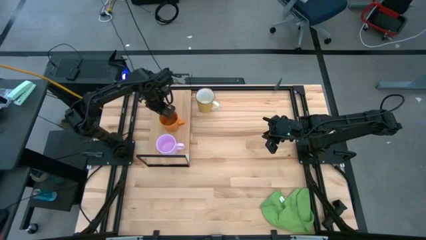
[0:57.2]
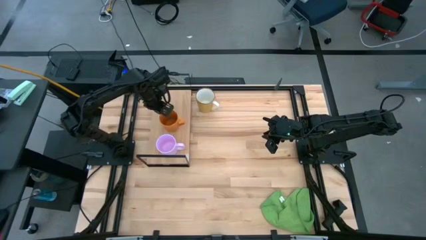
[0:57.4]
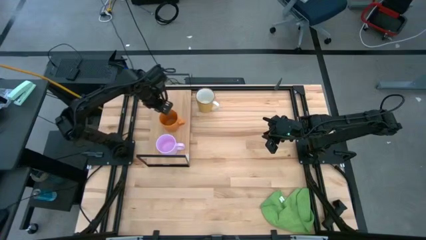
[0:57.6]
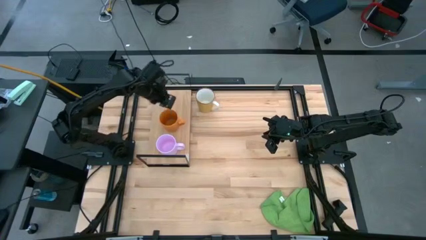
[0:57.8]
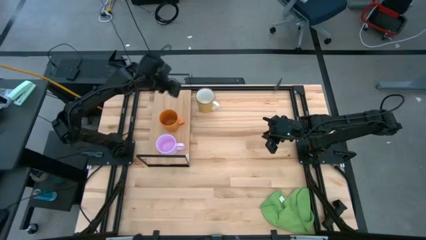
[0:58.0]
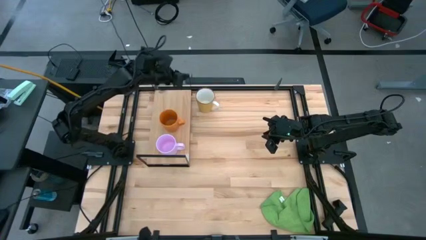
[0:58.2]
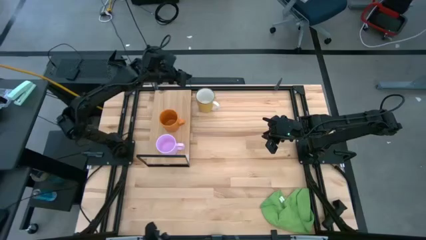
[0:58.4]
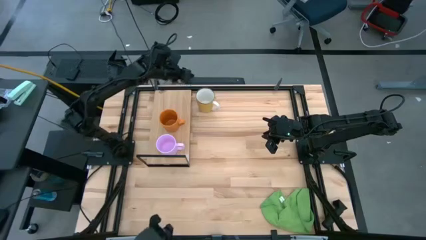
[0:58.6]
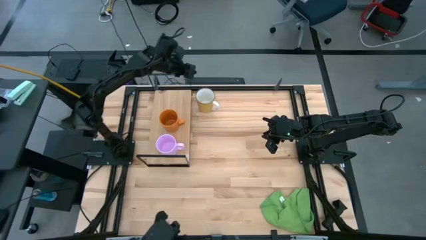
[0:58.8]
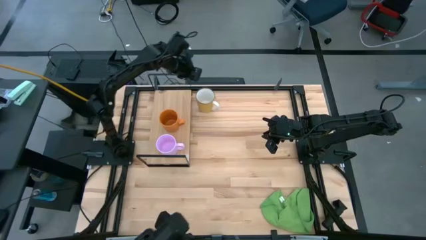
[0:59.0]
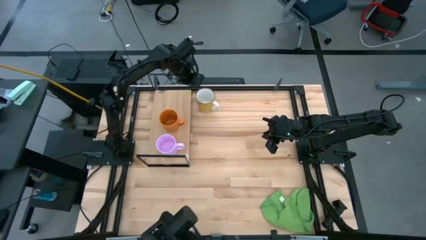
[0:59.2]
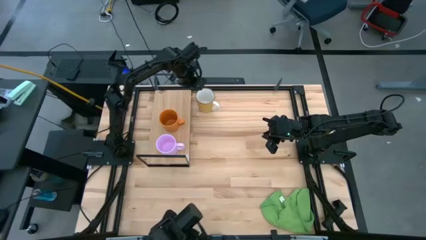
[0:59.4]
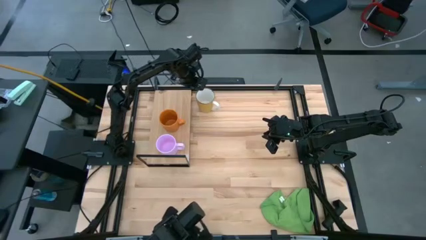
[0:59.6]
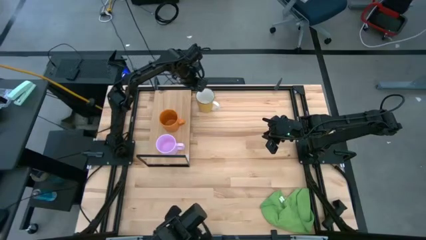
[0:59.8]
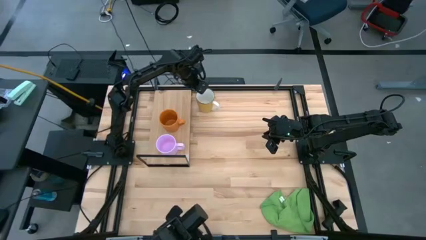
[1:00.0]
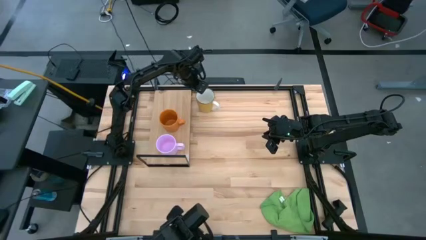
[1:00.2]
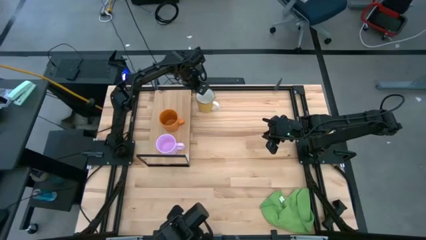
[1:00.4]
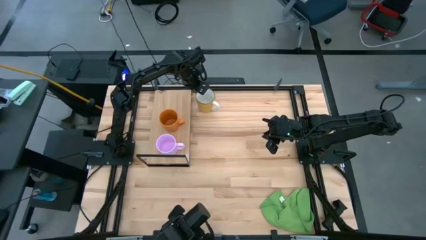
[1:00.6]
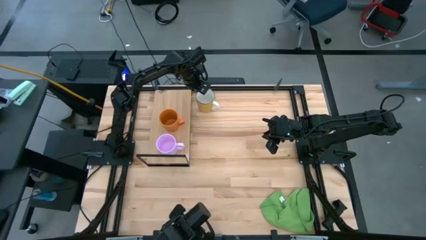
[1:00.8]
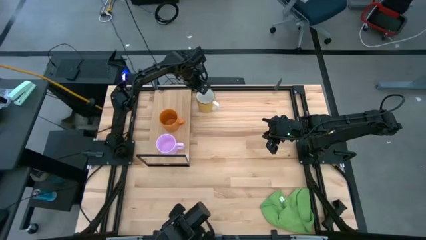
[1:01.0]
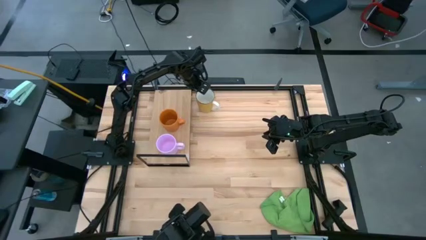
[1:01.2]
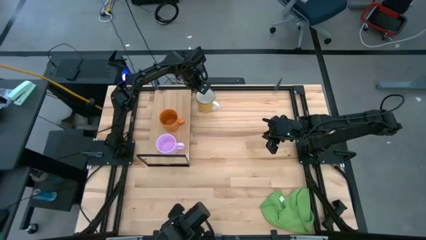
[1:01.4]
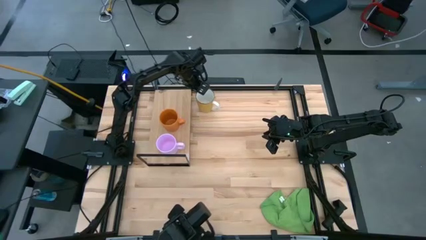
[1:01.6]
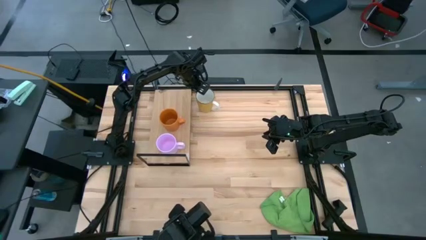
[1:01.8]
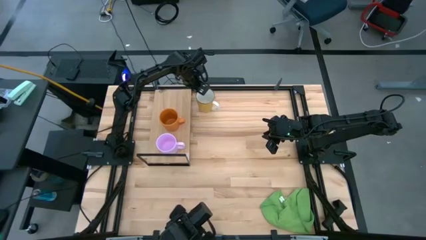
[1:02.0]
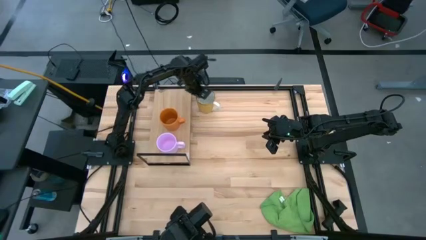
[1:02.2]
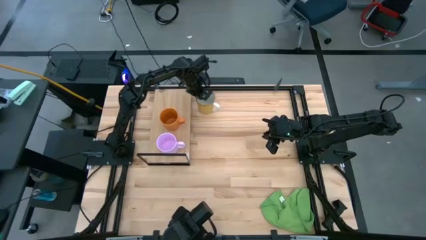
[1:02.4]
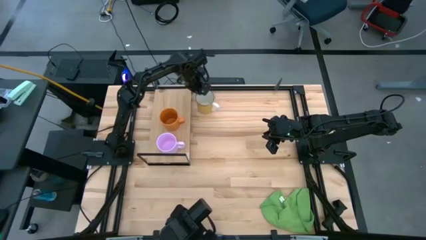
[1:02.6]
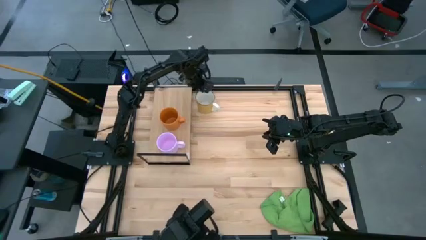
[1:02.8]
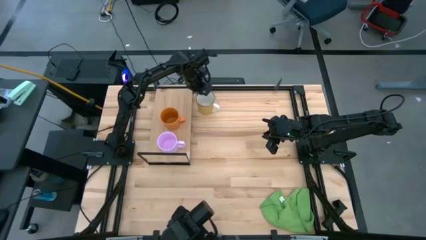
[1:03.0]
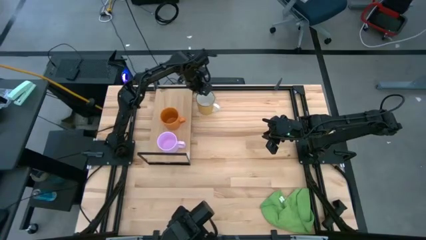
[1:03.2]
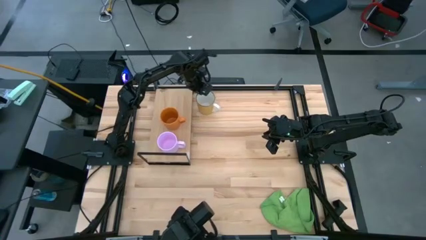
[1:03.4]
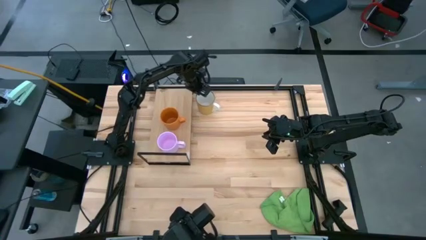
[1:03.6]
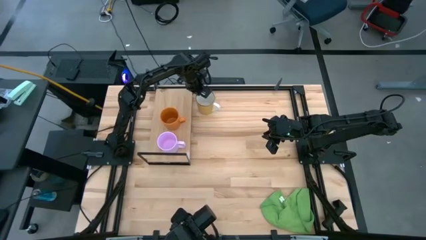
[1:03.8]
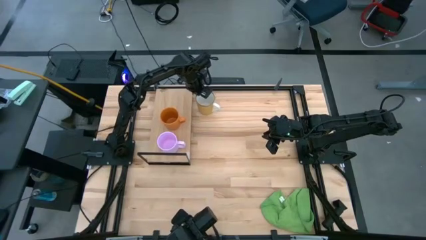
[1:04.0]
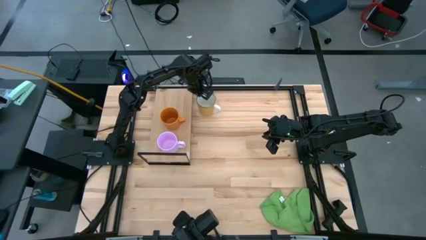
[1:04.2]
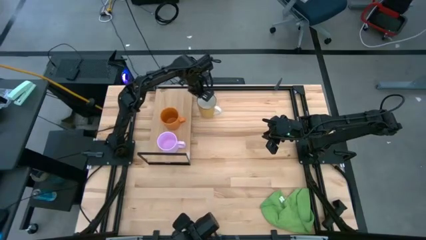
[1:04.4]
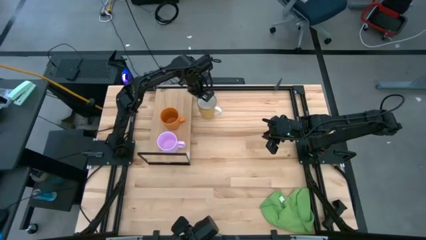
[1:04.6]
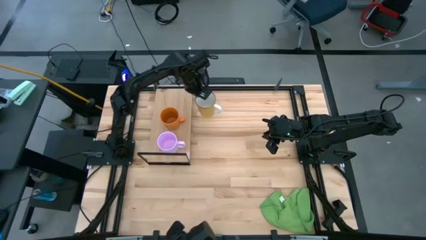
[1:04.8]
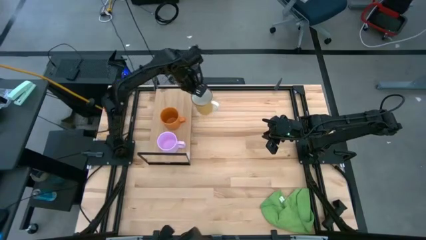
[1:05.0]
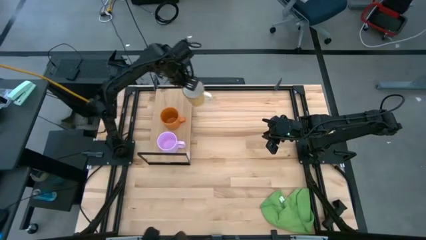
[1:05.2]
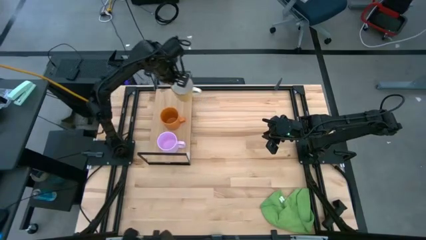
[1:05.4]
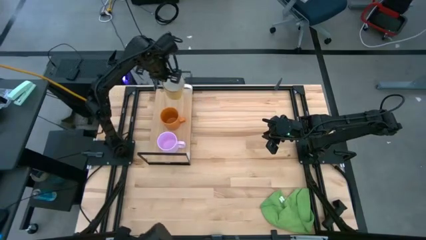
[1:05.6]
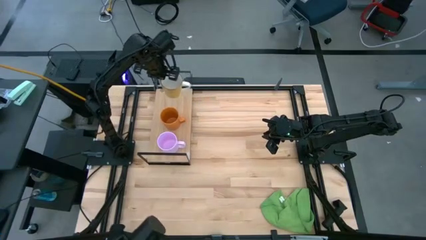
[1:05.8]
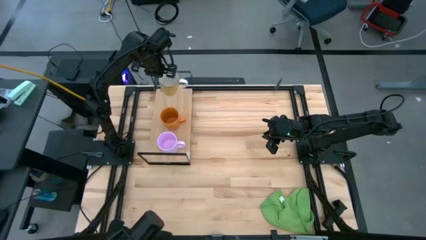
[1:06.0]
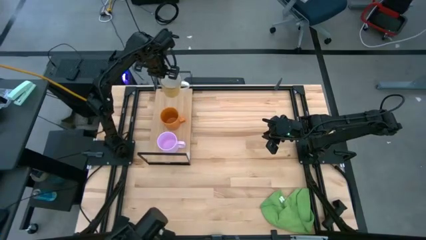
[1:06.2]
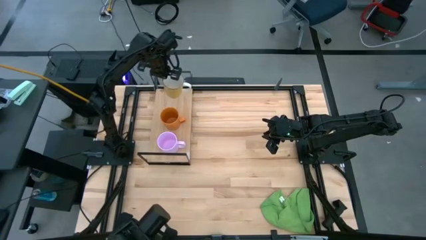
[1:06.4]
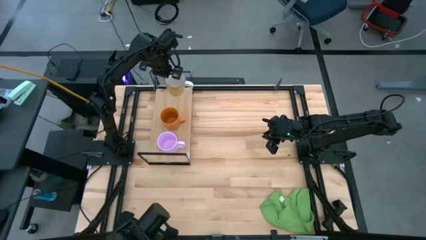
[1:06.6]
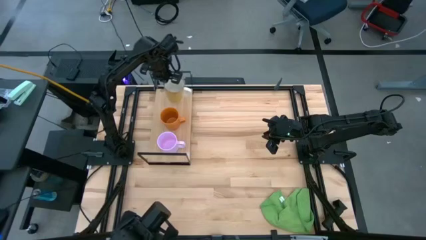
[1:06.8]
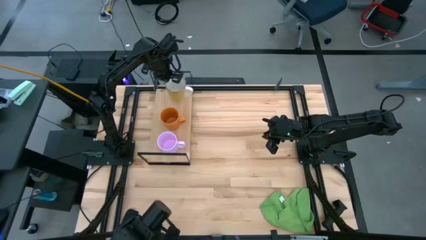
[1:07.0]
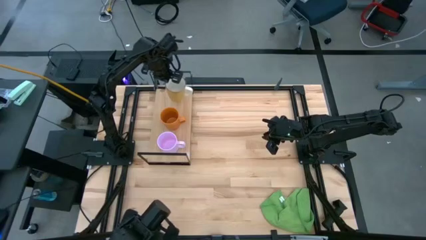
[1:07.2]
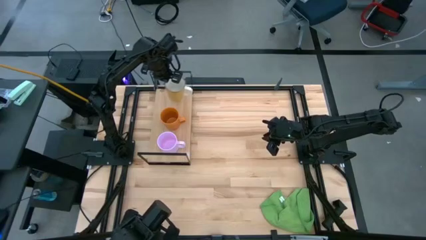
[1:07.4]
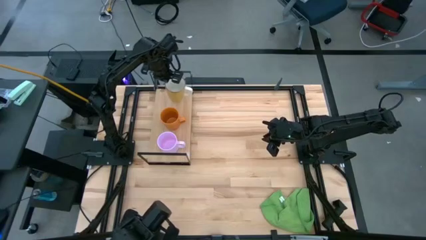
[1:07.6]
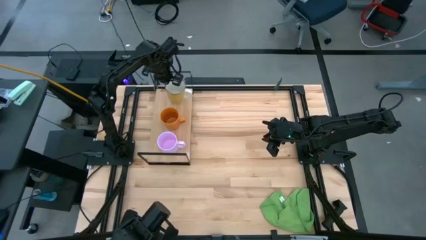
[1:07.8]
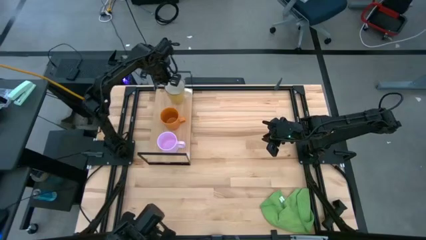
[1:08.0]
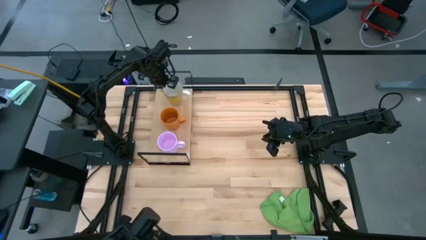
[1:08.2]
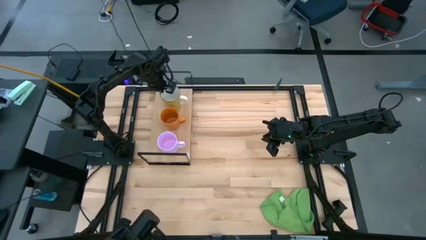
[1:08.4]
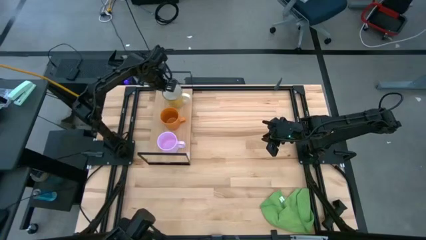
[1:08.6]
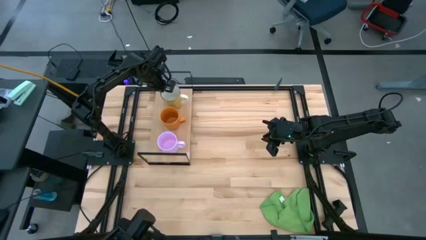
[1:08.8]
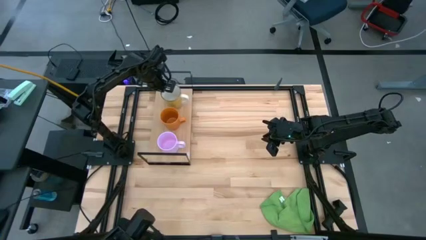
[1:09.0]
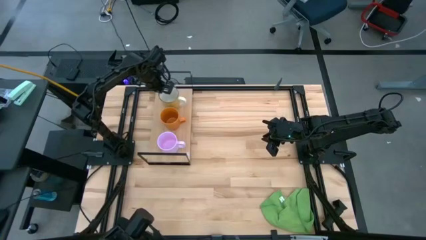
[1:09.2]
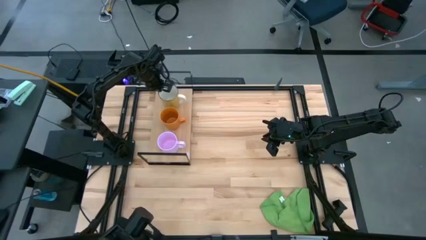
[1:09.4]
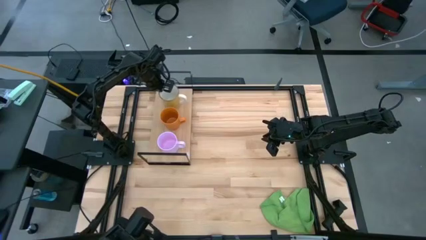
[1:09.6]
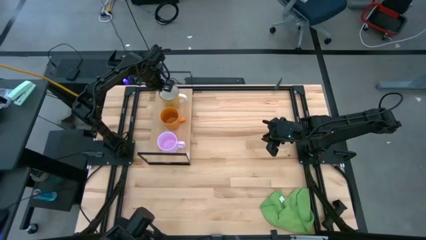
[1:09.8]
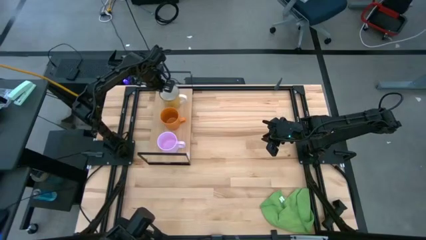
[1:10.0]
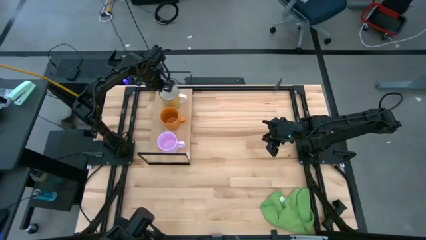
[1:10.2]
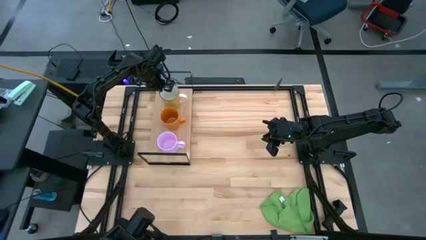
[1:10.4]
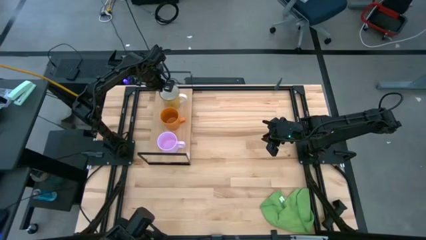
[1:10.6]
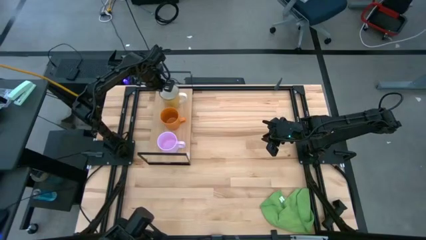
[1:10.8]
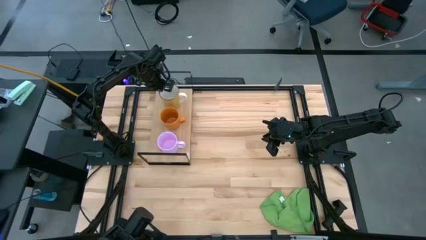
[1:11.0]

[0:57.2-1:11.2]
Task: Stack small to large cups/mugs on shelf
Put the yellow mug on the shelf

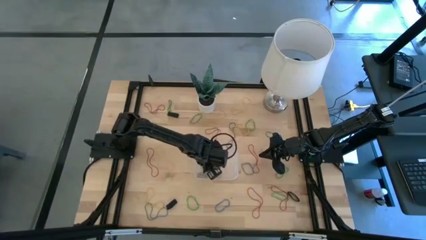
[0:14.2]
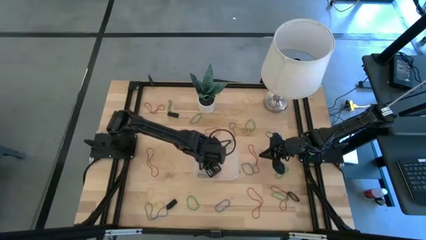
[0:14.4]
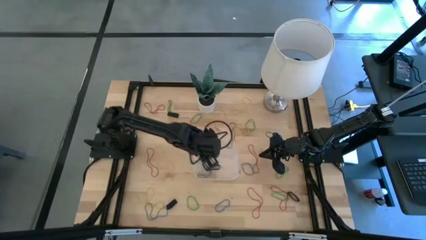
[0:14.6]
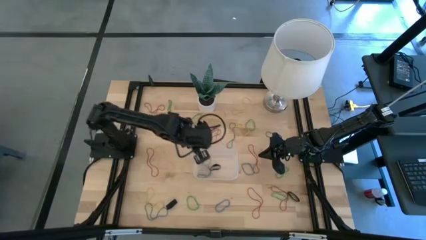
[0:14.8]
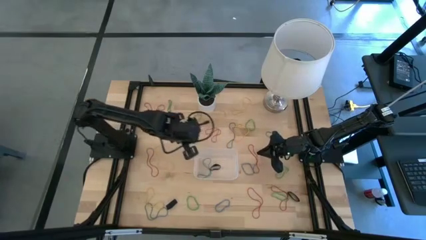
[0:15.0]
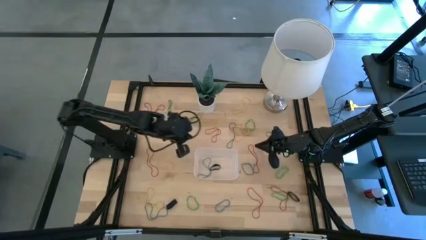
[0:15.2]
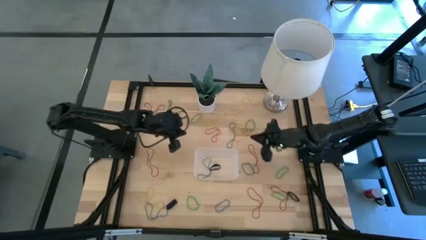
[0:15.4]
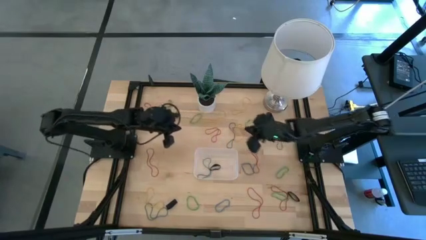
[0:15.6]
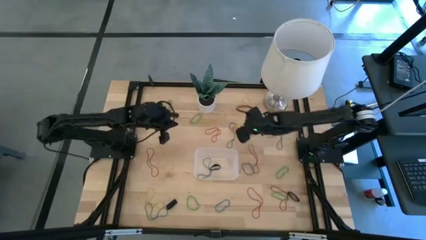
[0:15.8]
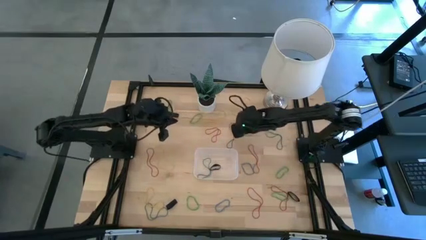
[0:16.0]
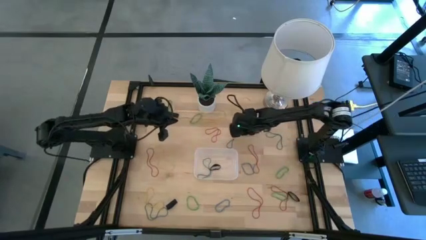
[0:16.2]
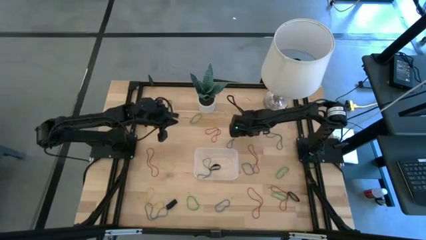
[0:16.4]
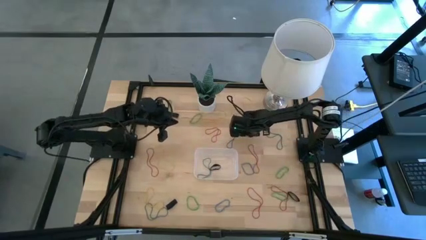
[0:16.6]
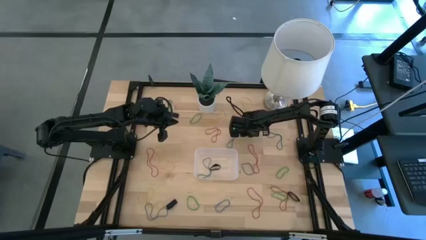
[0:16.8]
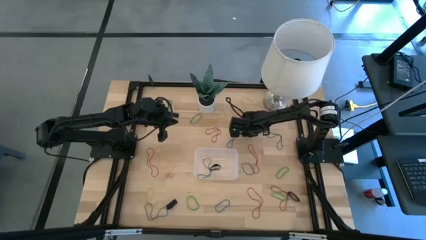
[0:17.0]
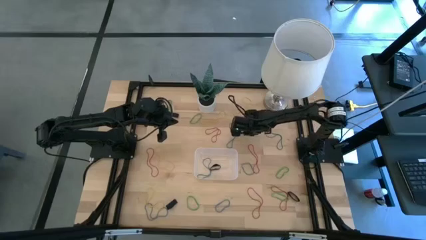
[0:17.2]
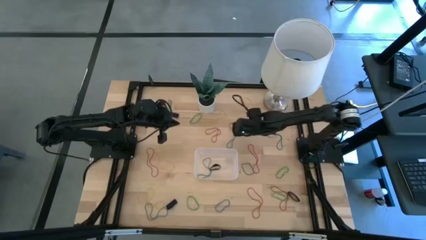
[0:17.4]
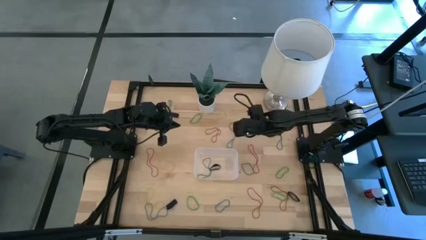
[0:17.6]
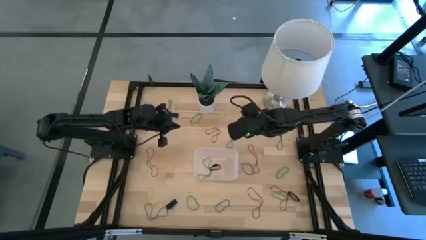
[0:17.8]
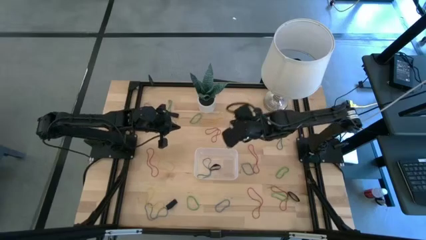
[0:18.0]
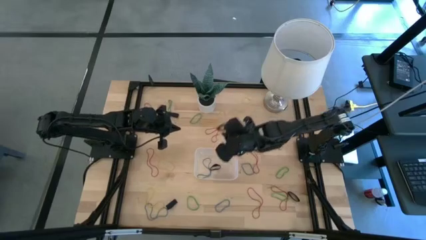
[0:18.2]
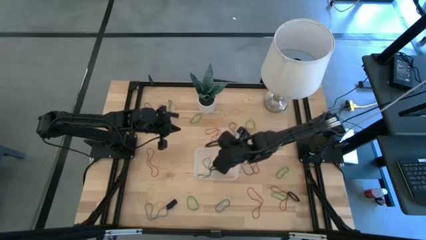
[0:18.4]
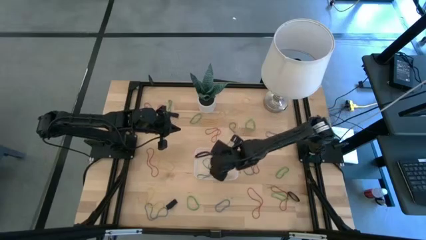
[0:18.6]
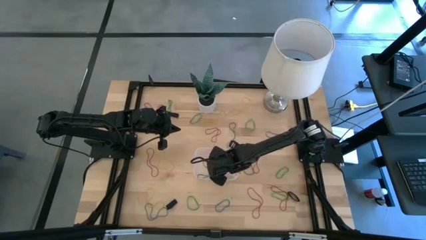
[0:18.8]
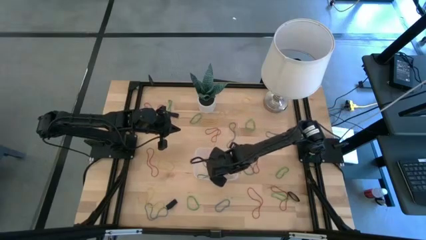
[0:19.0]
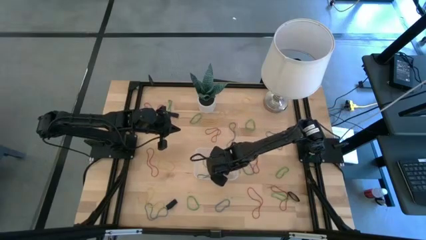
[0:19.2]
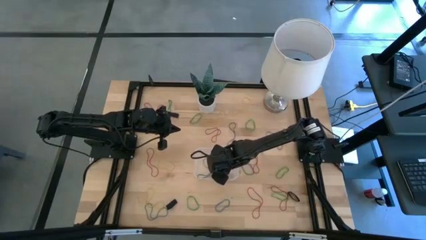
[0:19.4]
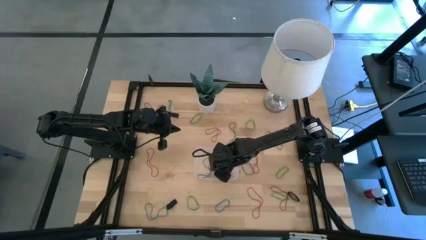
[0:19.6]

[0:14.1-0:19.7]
Task: Pick and place rubber bands into bin
Put the yellow rubber band into the transparent bin
